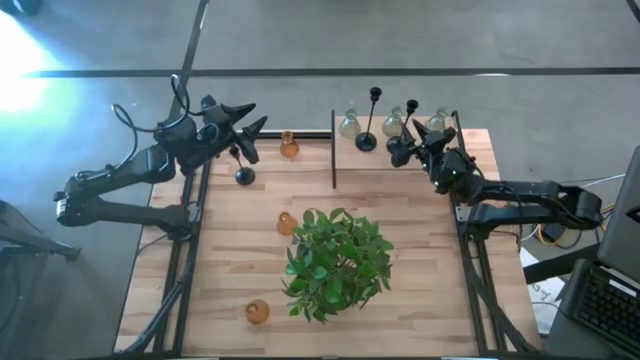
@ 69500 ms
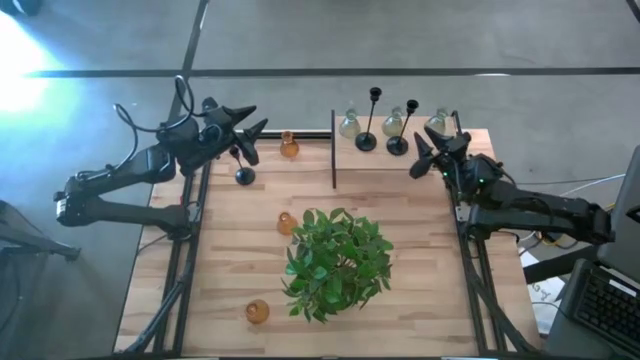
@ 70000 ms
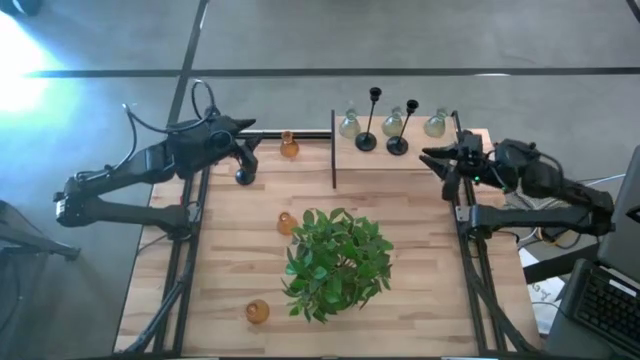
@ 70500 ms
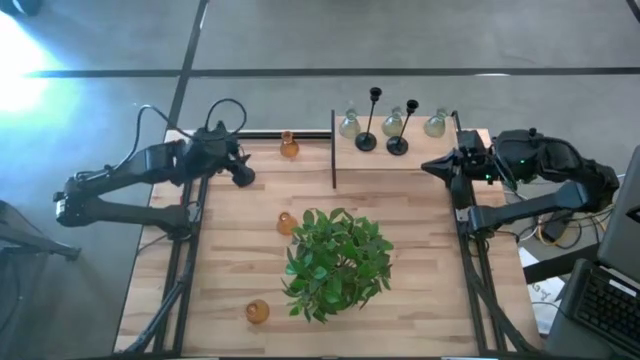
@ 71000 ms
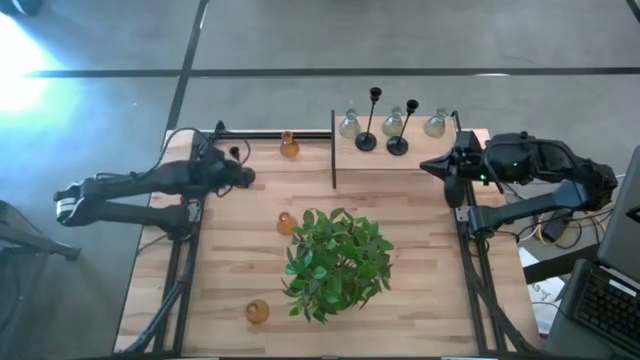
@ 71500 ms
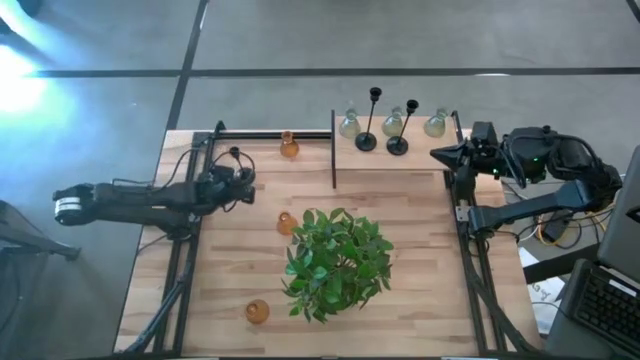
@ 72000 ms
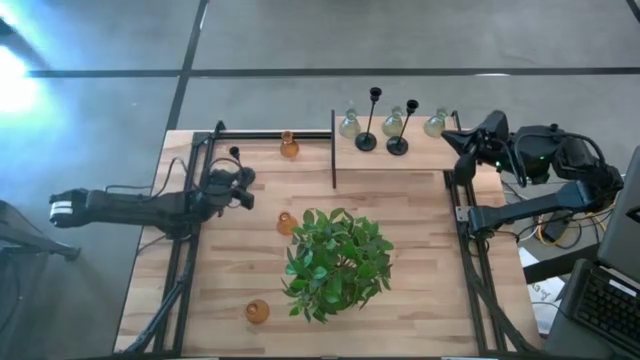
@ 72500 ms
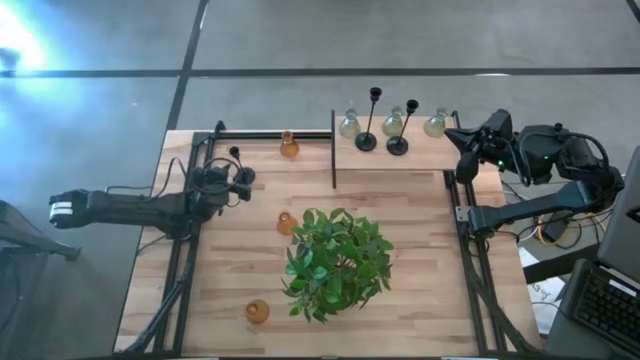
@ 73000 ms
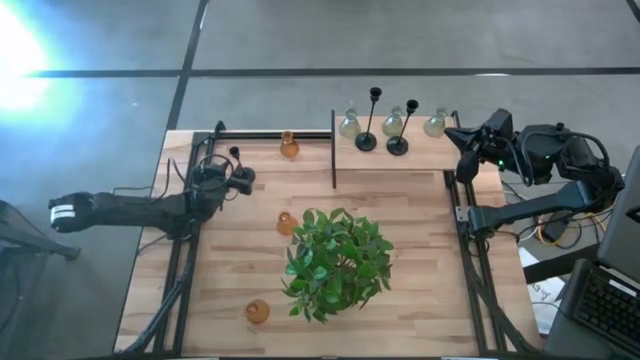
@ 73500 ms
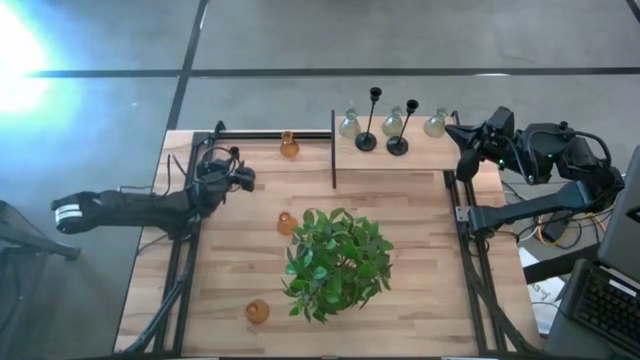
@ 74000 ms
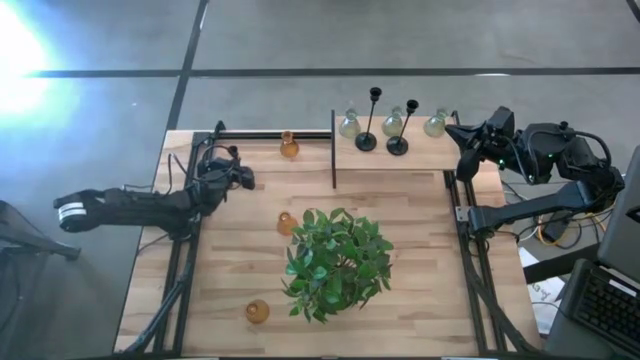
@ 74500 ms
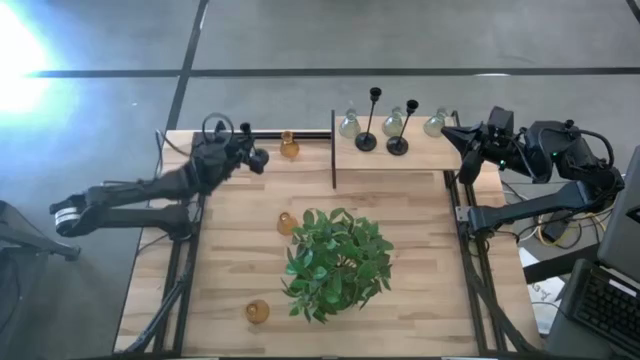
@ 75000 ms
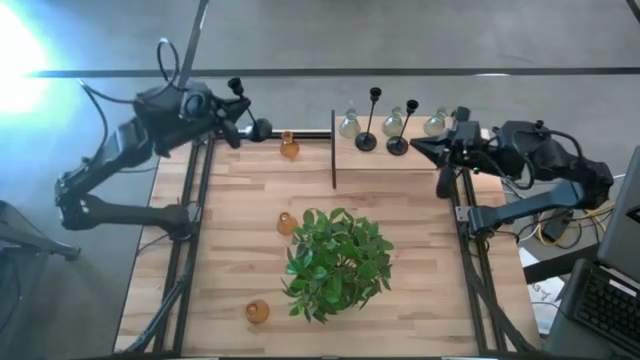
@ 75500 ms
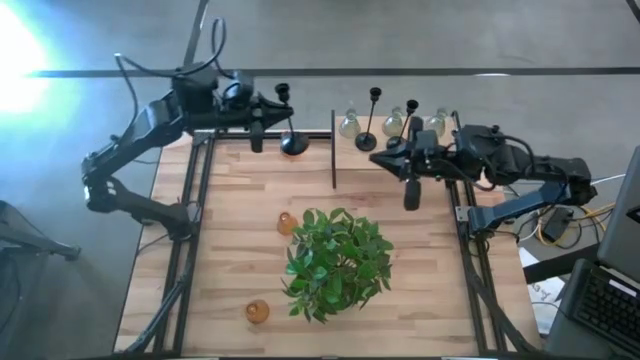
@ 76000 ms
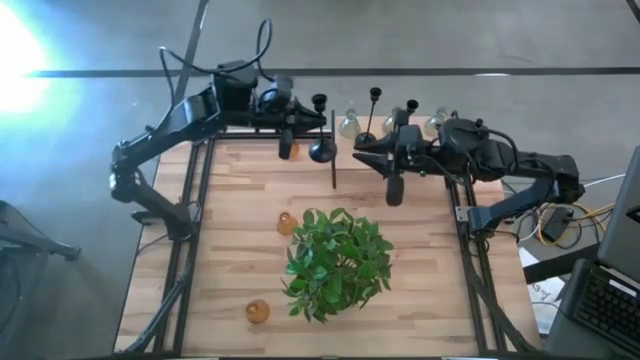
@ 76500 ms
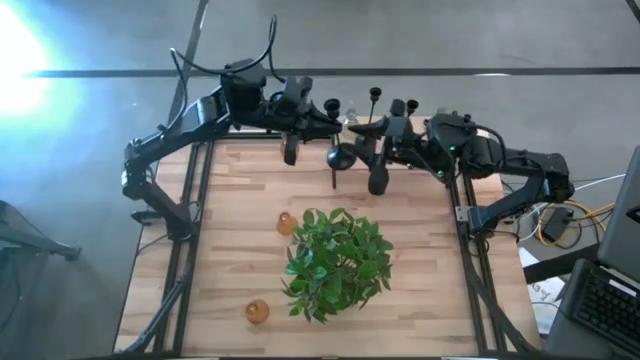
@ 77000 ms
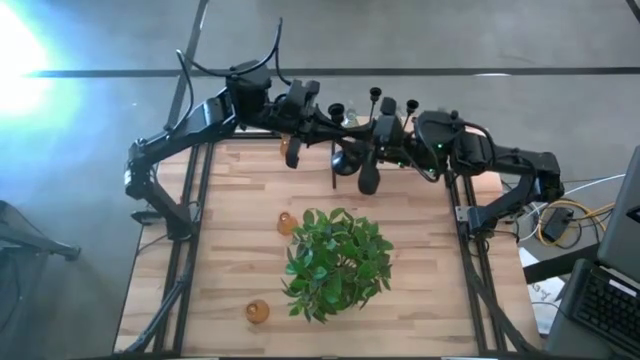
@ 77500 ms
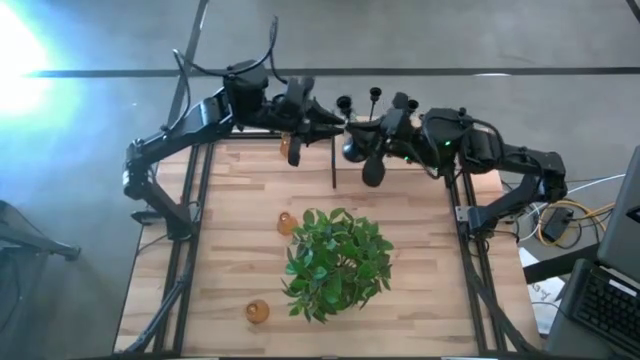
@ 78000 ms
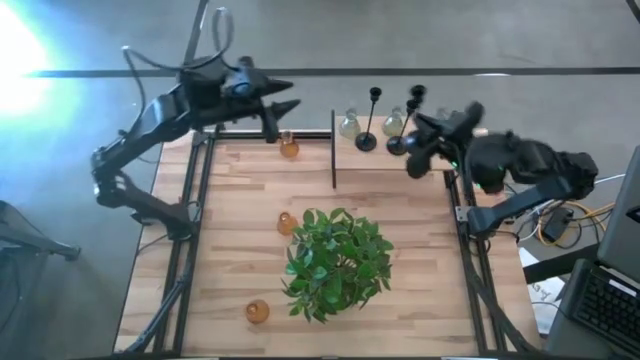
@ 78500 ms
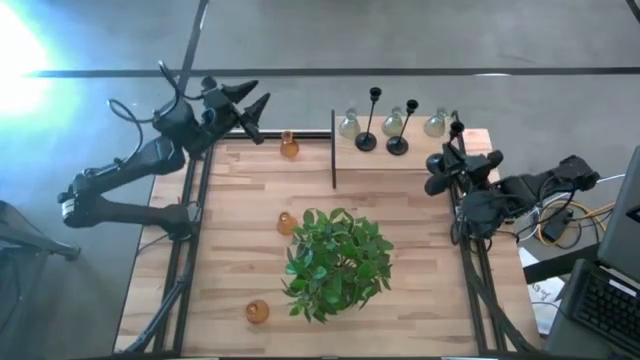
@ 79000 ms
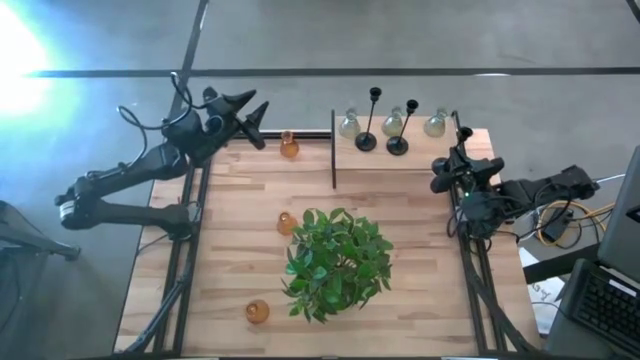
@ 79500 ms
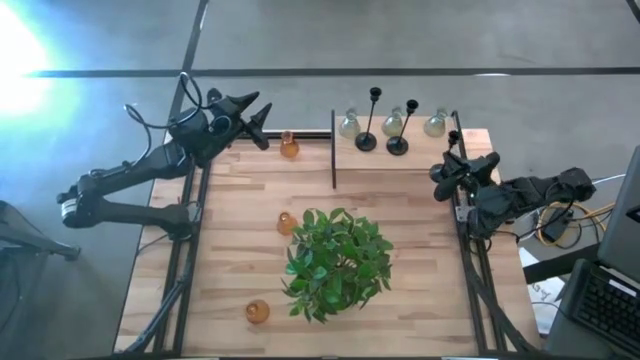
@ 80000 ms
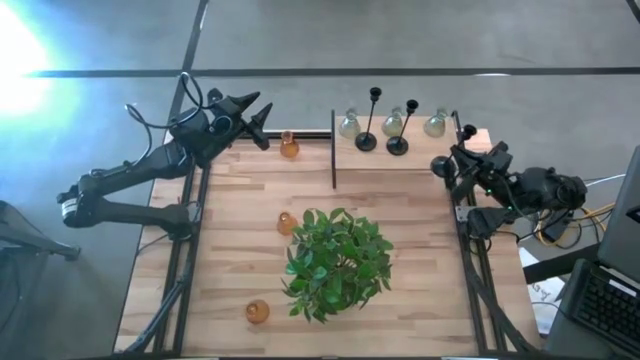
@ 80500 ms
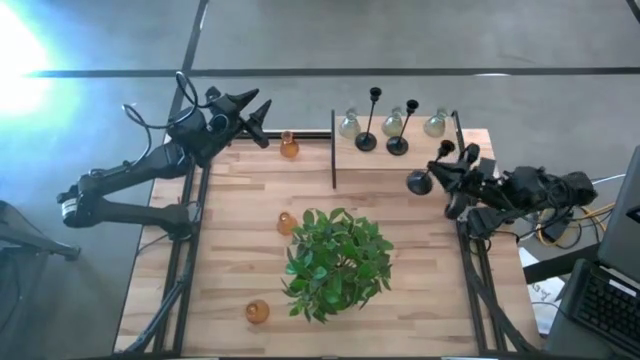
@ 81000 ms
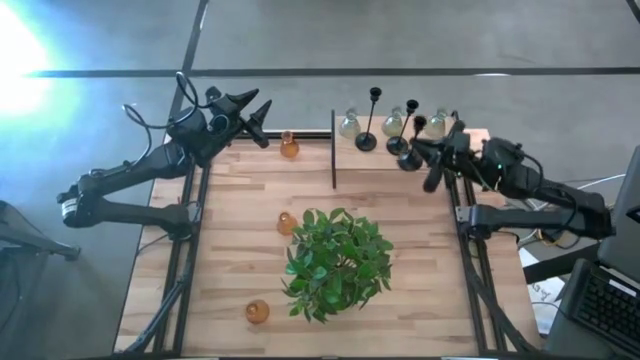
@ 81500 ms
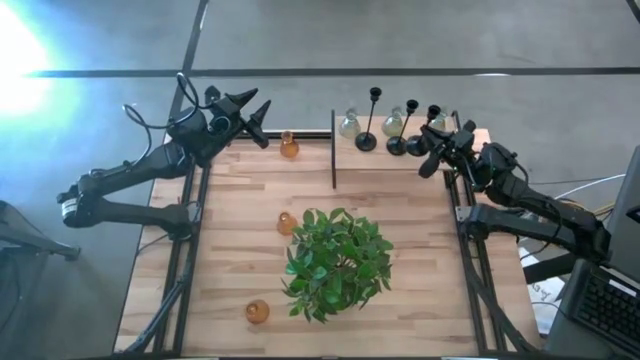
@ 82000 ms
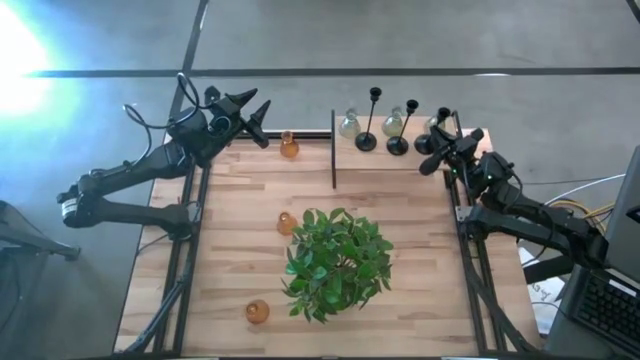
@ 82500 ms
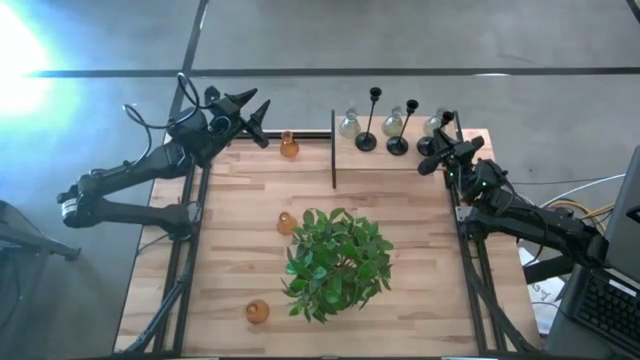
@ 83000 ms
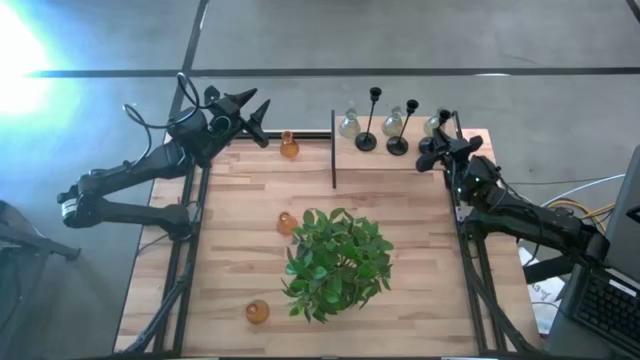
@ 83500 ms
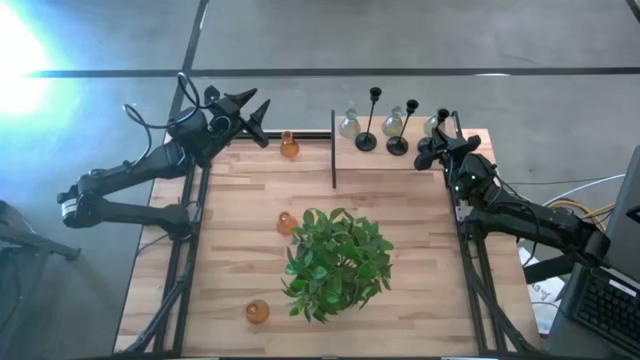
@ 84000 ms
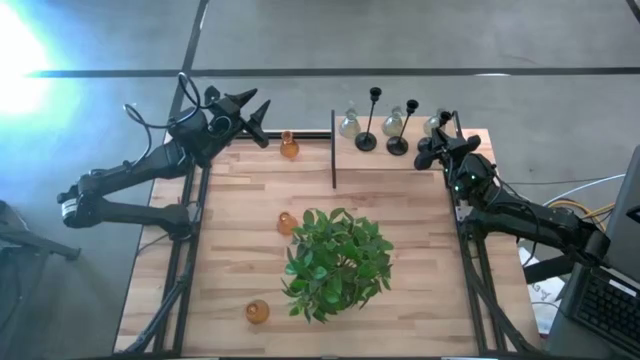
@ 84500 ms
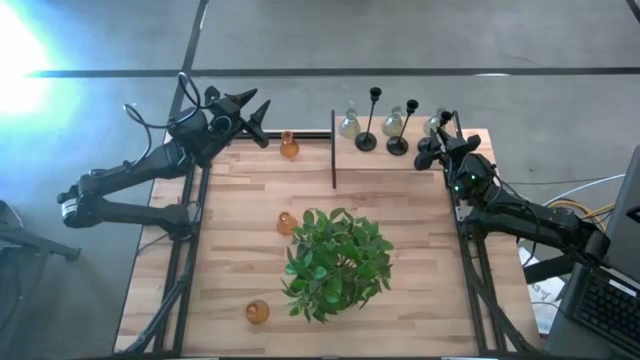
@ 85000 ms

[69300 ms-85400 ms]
Task: Pick & Place candle stick holders
Put the black candle holder on the shelf

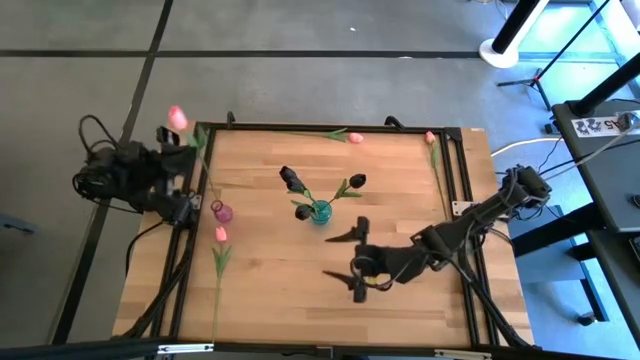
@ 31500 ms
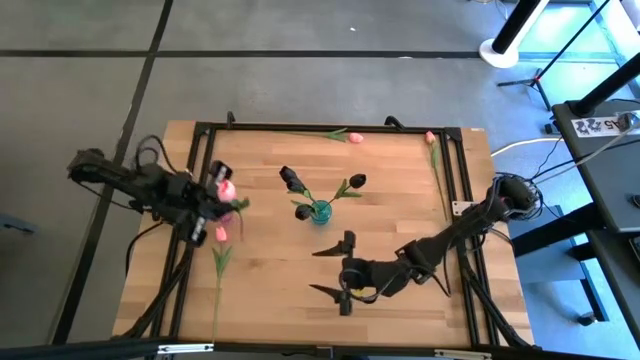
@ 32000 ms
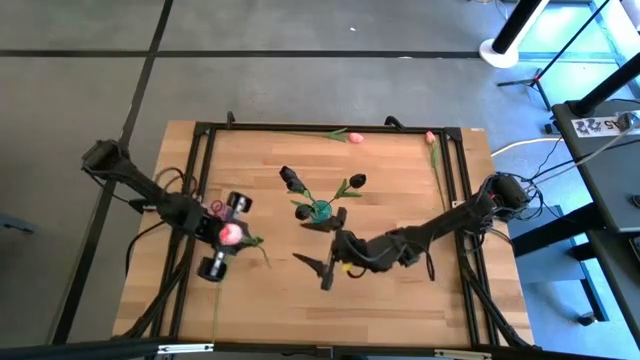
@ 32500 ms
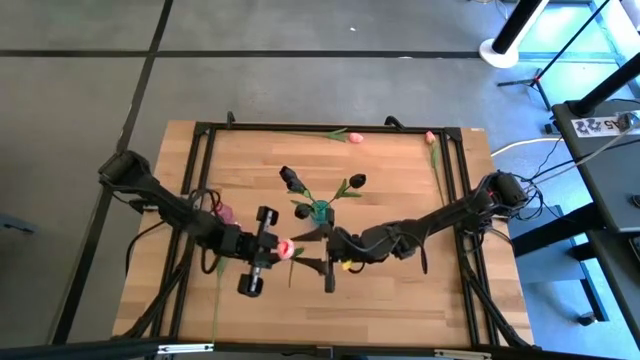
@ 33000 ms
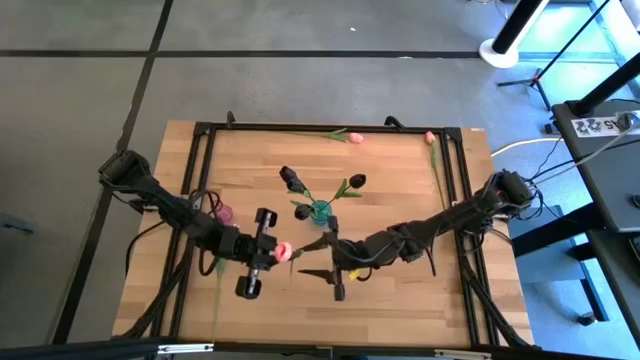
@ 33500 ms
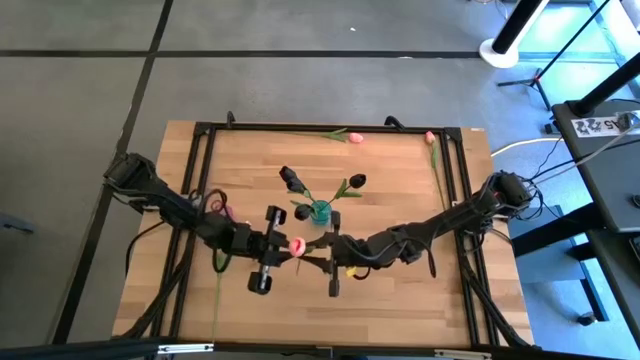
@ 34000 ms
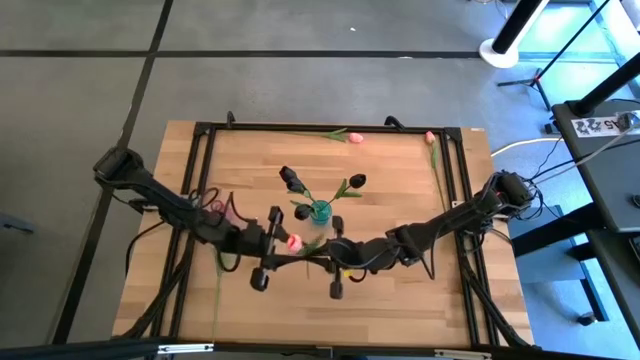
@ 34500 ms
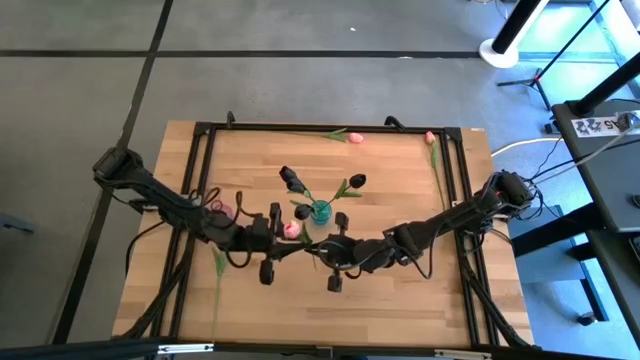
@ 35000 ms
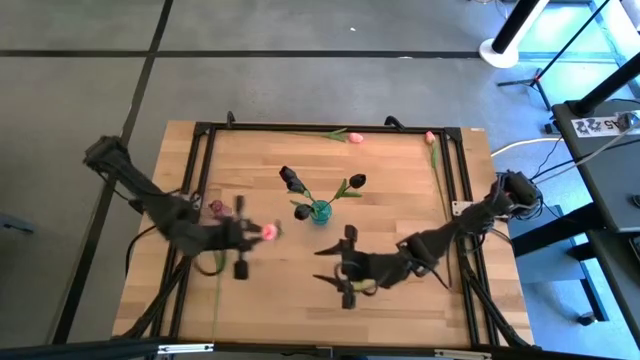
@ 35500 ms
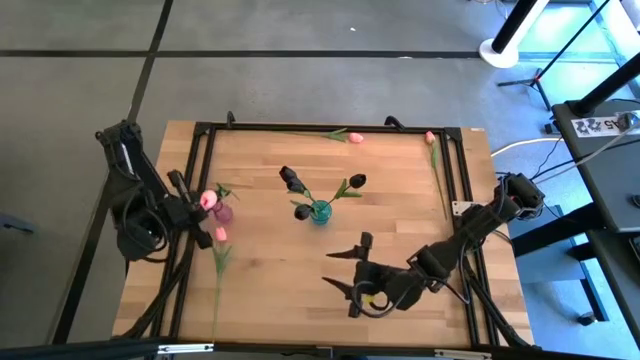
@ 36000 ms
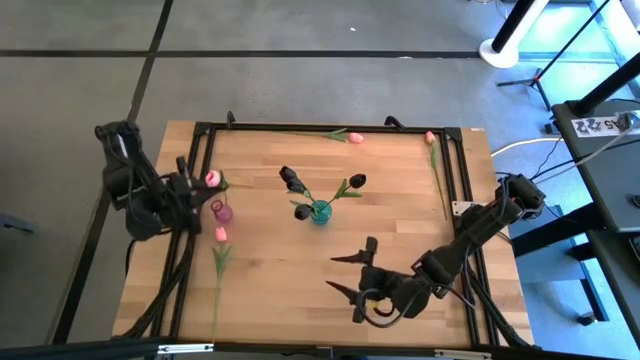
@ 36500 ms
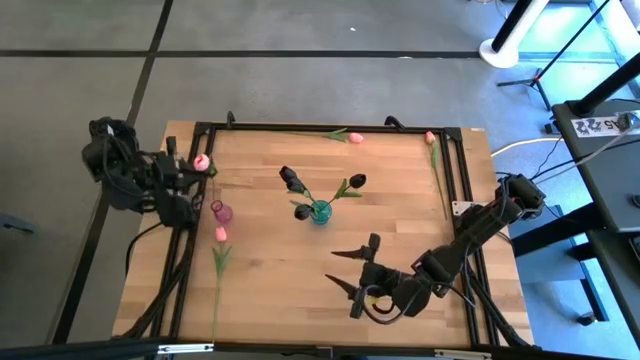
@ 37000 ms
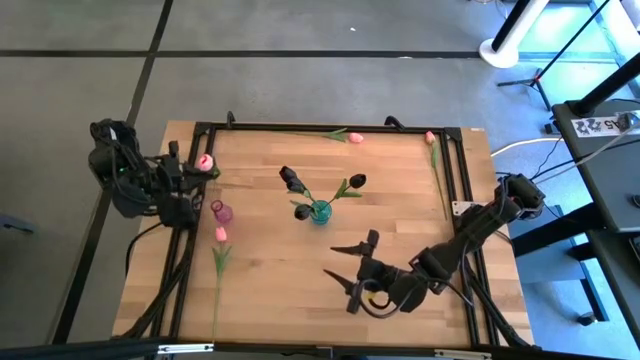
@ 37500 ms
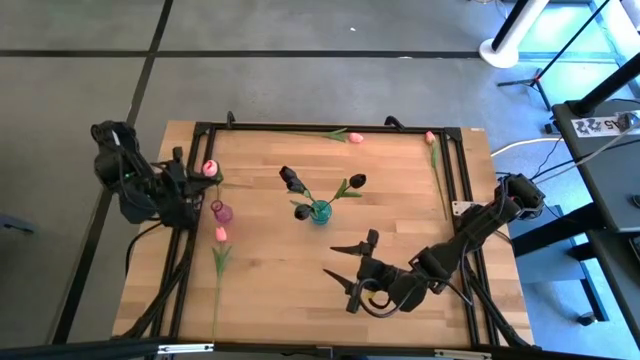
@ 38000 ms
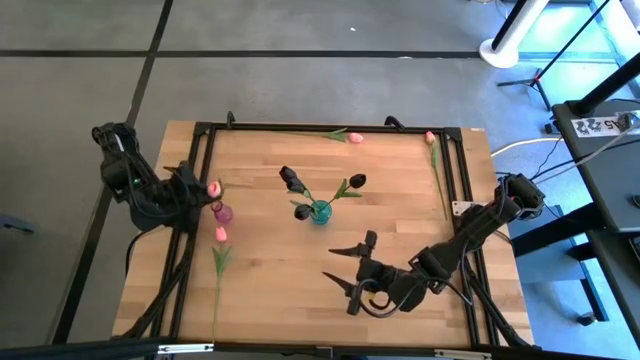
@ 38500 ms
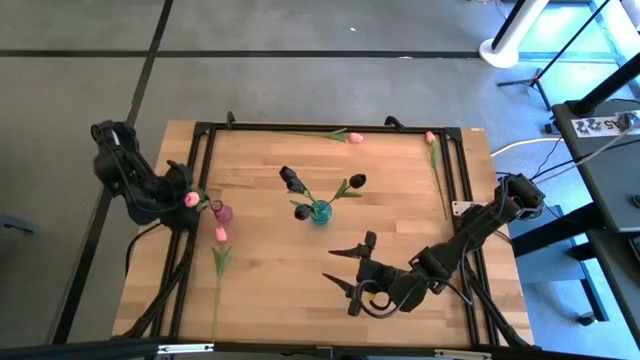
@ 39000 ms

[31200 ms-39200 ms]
Task: Sort flowers into vase by color
Put the top left pink tulip into the pink vase
